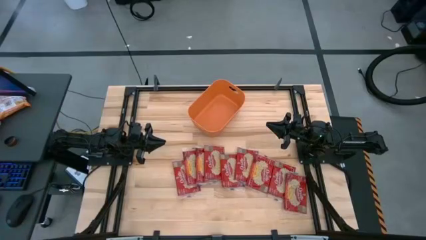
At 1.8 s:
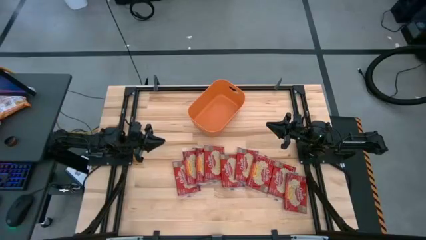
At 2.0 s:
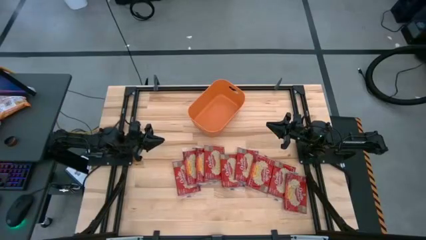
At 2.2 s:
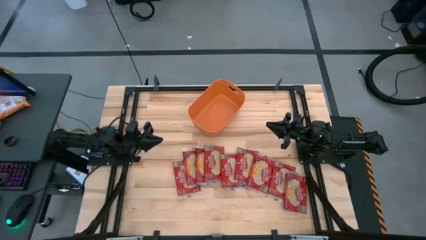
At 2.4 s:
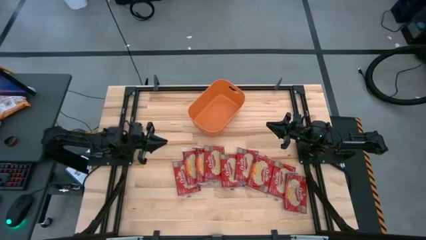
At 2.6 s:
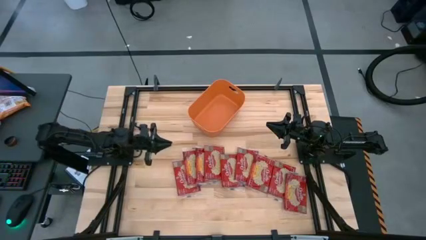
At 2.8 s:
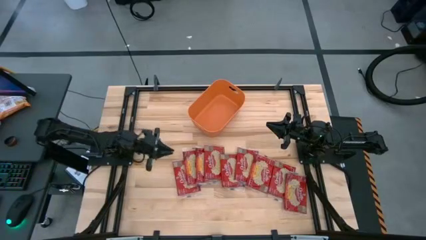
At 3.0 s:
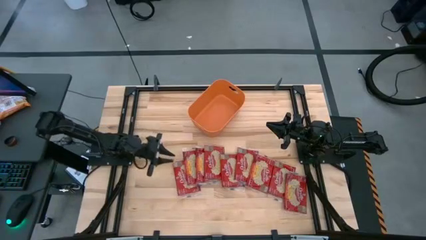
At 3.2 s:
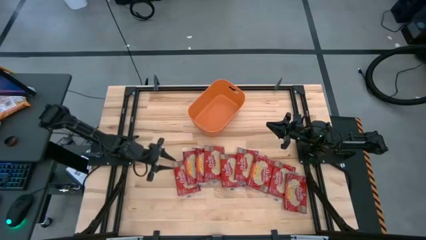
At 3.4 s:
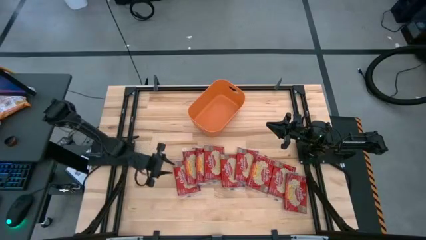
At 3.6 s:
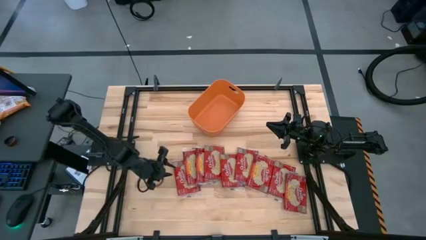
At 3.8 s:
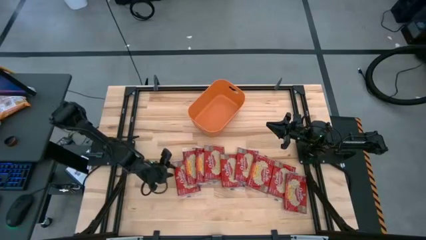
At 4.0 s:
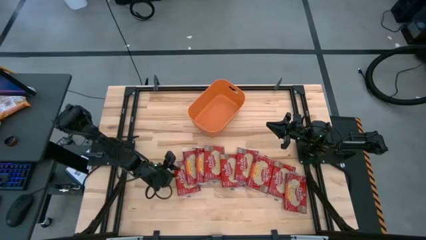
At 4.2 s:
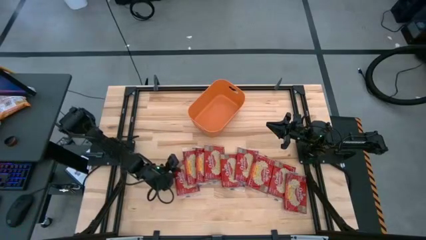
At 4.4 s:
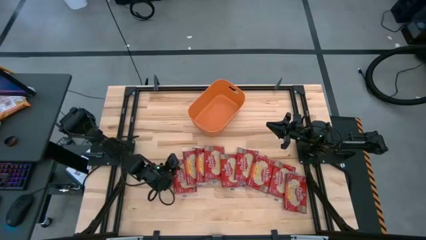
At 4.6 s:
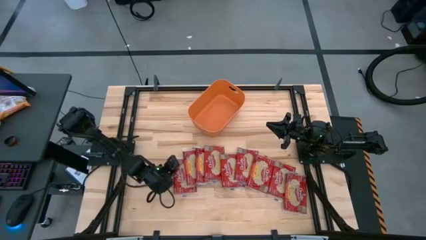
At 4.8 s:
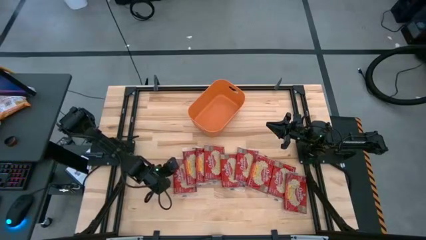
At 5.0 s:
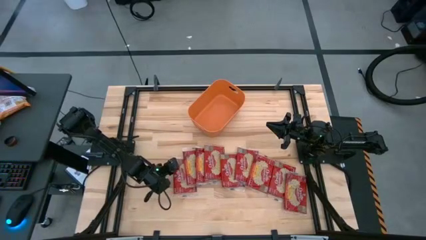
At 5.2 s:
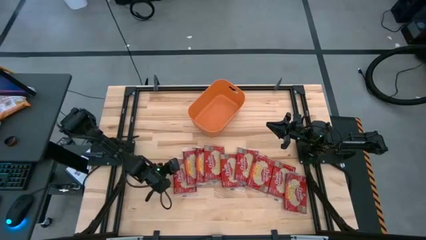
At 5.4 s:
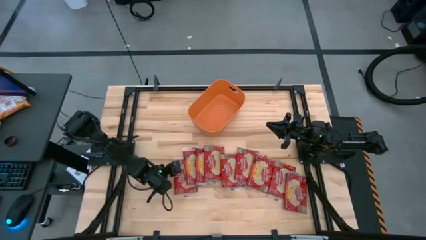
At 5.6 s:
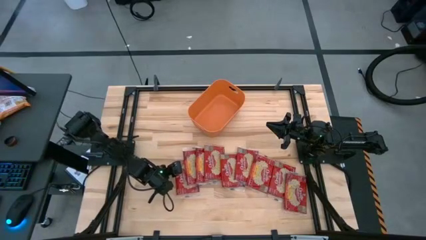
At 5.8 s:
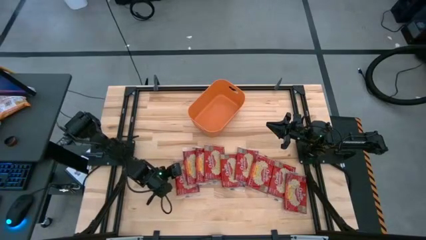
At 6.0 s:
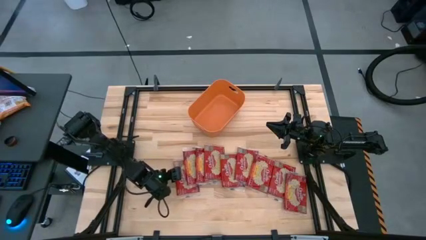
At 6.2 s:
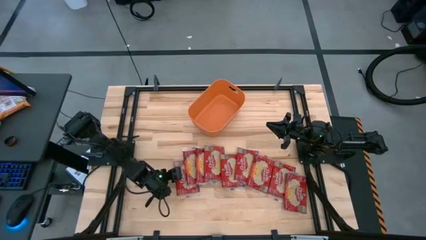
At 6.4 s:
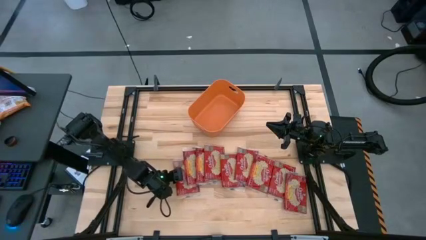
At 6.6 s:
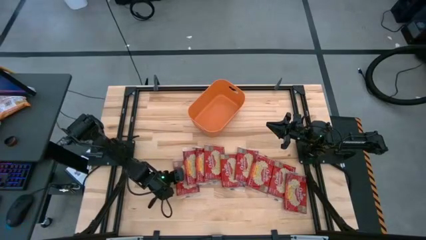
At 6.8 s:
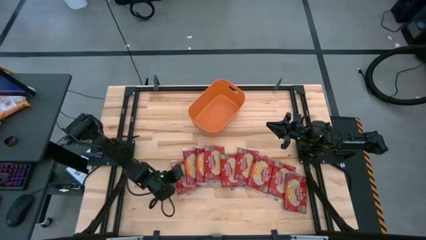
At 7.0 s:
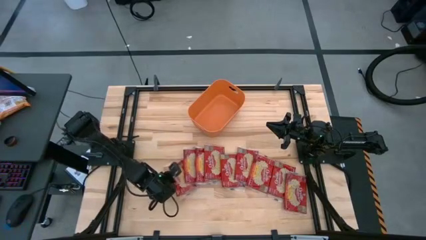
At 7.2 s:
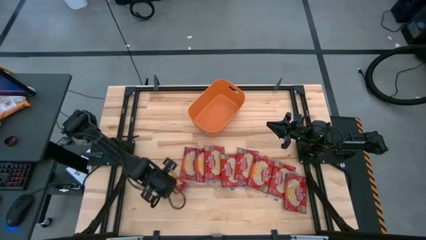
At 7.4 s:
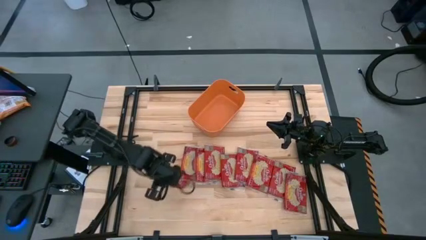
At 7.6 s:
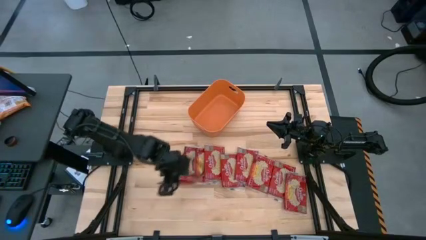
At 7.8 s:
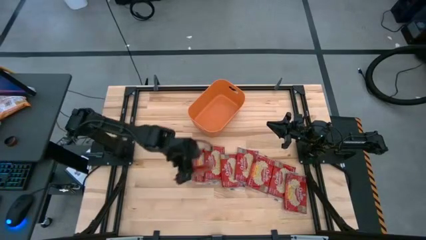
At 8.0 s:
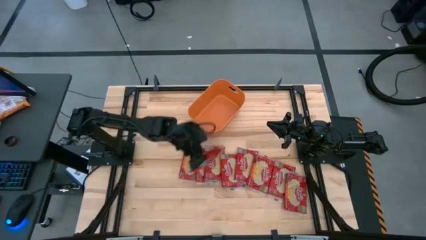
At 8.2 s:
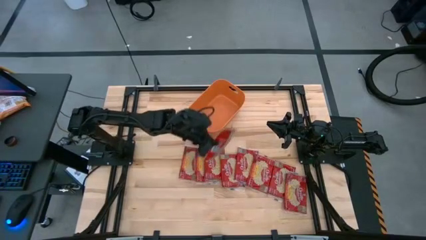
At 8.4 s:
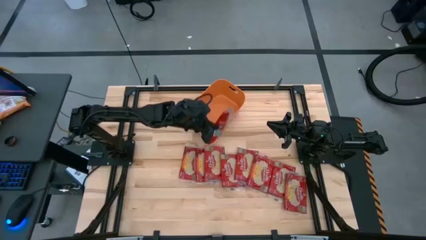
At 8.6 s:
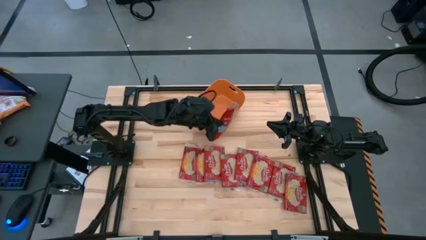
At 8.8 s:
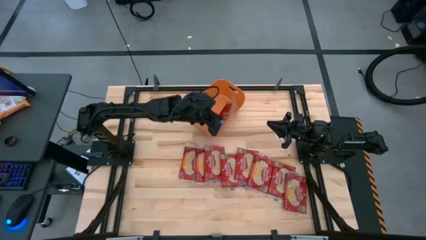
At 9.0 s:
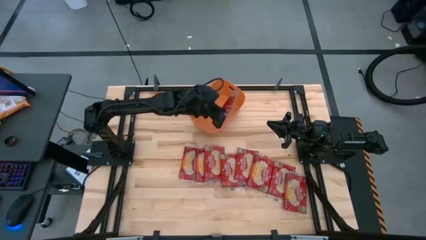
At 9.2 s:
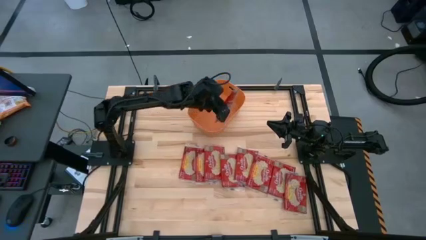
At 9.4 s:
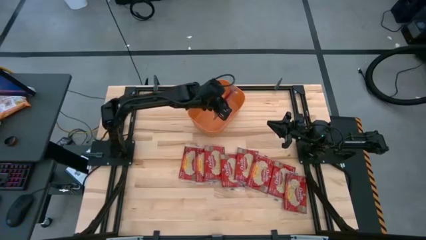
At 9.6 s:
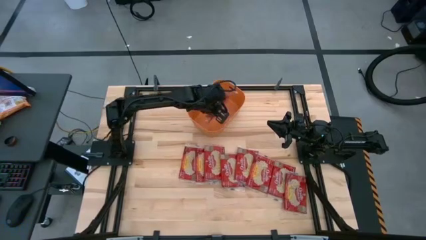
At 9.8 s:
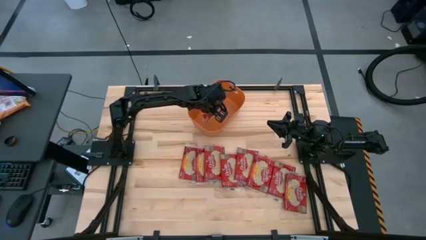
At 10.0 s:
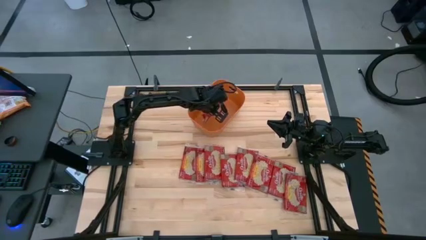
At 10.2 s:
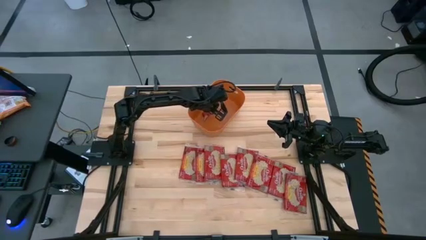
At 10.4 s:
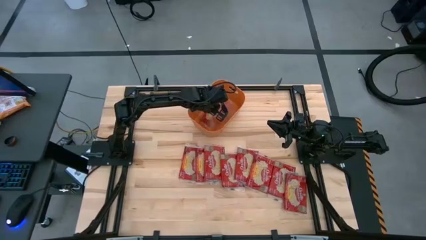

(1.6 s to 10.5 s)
Task: Sort popcorn bags into baskets
Put the red popcorn bag into the orange bin

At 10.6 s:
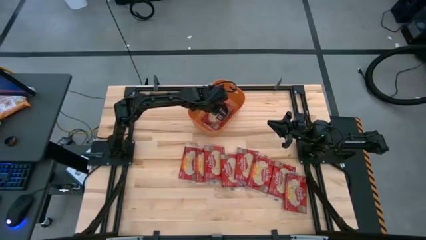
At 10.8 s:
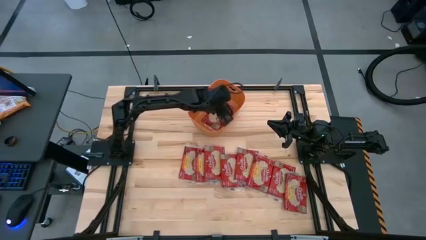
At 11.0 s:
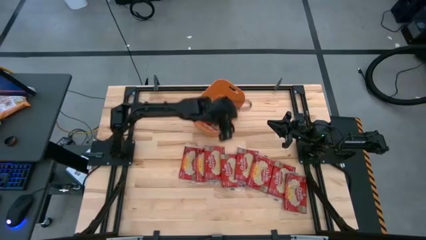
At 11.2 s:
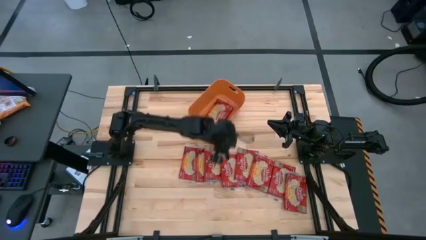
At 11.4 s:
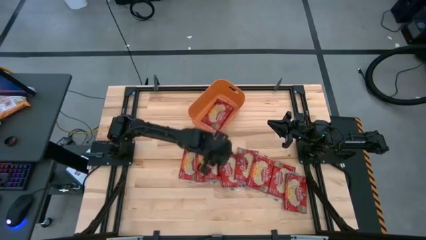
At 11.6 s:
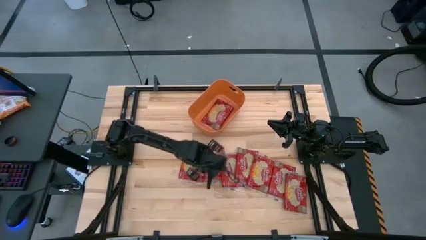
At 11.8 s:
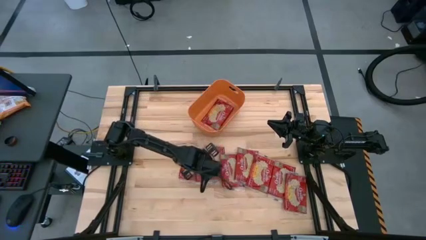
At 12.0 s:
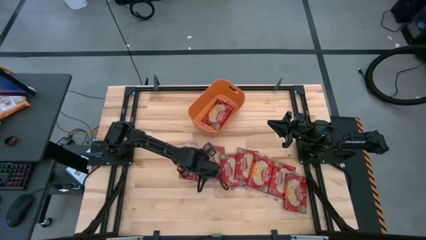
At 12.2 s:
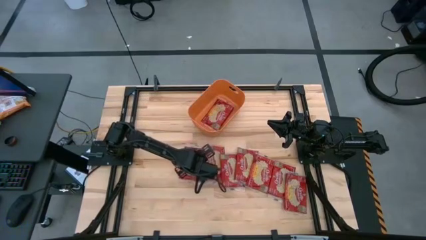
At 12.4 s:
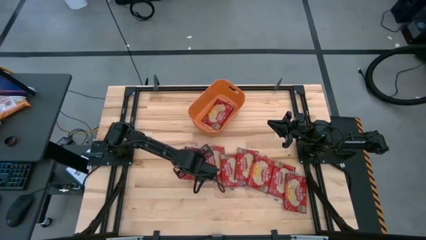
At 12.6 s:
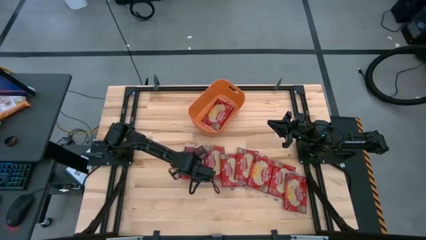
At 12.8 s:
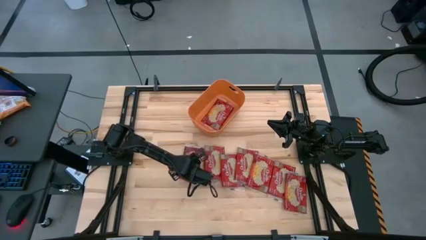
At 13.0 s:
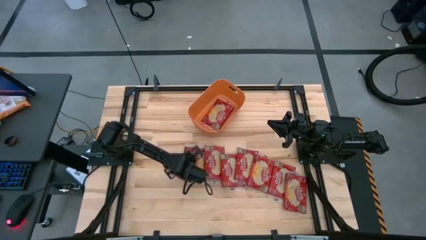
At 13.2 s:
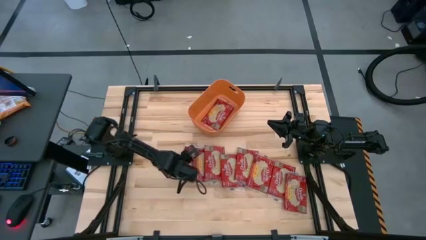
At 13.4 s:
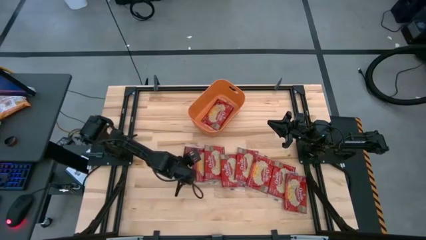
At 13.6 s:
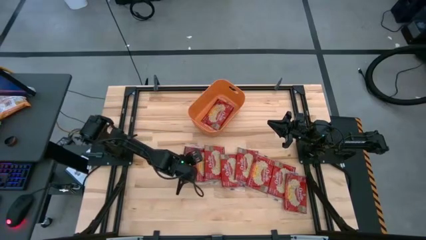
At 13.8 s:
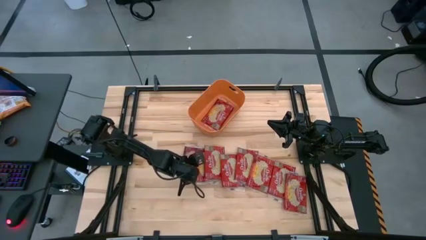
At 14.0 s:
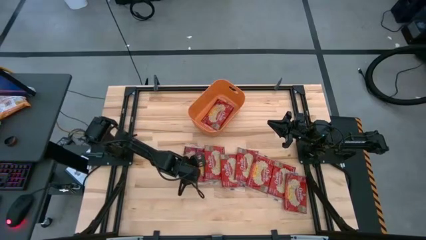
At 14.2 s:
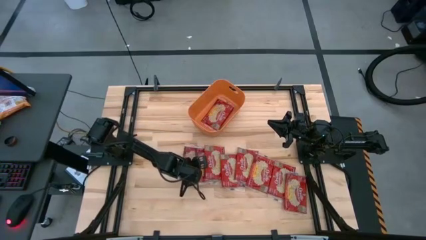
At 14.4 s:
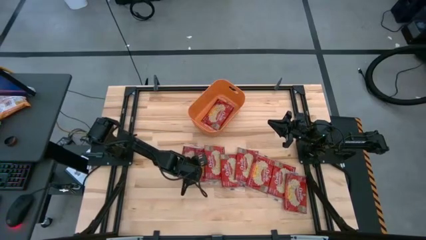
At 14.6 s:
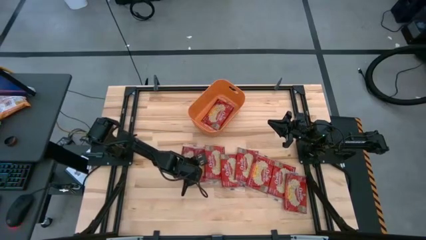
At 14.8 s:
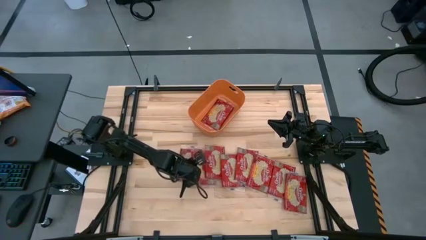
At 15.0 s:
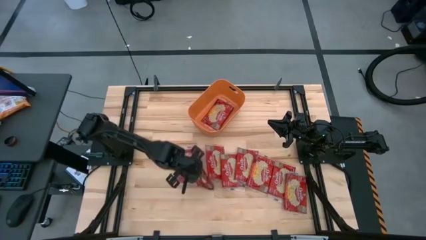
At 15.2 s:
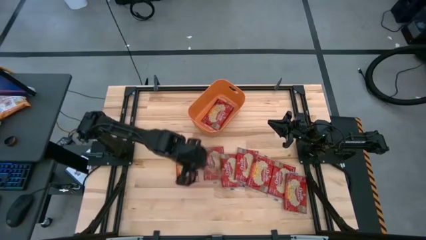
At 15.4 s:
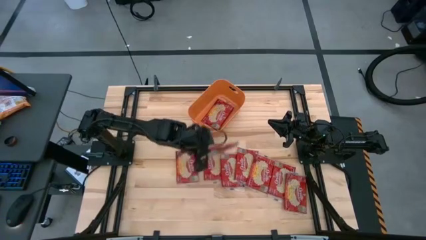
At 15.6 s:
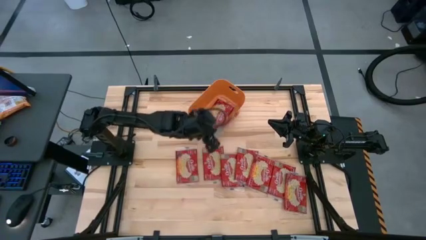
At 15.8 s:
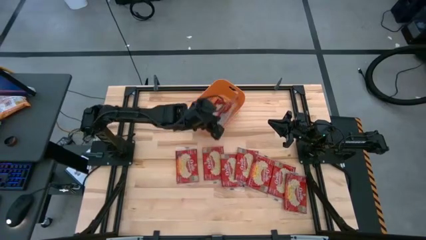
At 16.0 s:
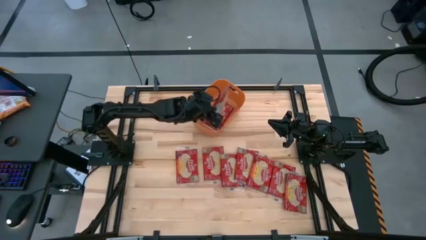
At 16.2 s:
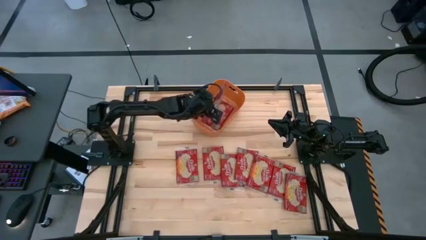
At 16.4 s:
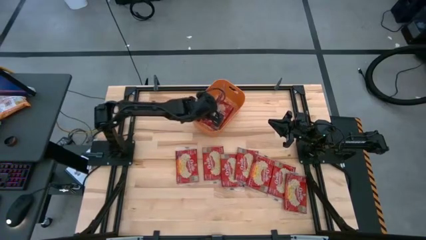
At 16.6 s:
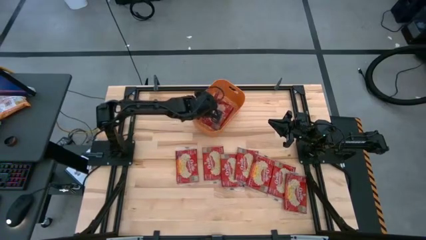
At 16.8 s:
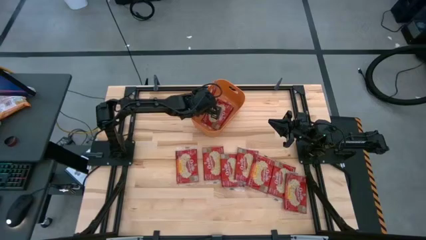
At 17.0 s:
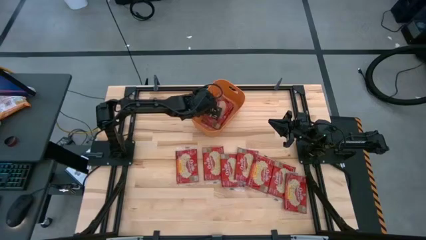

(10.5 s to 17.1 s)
Put the red popcorn bag into the orange bin

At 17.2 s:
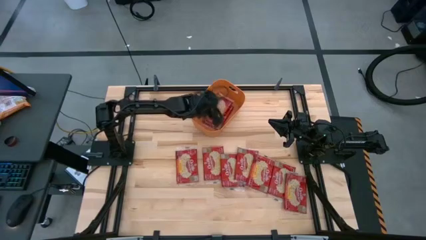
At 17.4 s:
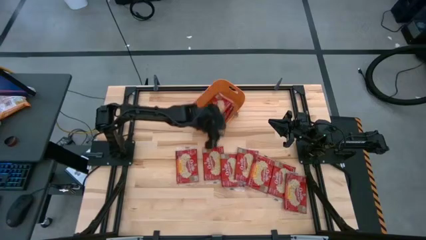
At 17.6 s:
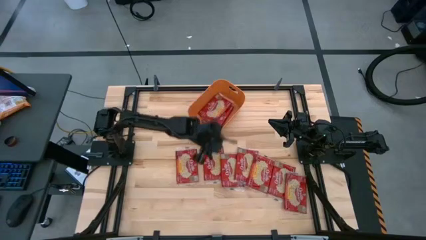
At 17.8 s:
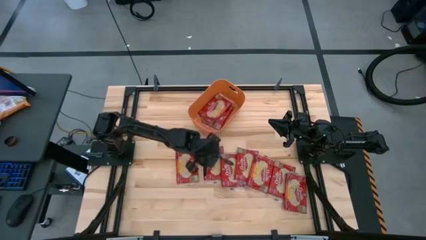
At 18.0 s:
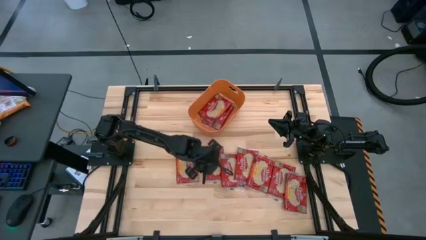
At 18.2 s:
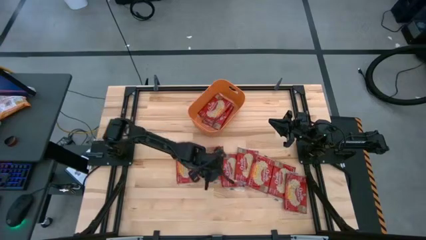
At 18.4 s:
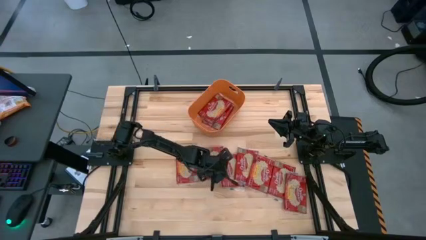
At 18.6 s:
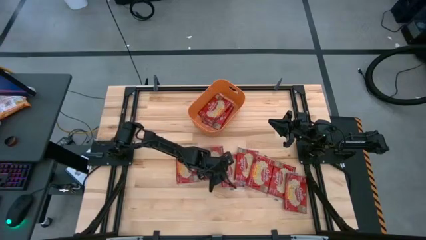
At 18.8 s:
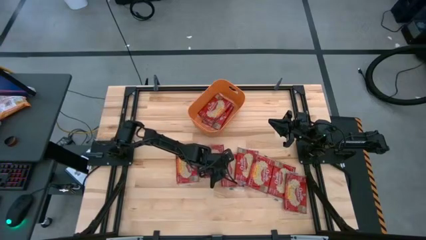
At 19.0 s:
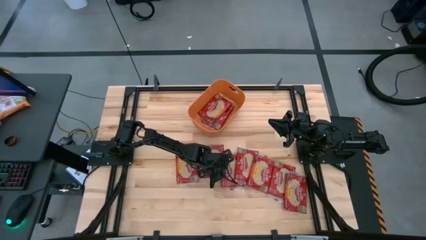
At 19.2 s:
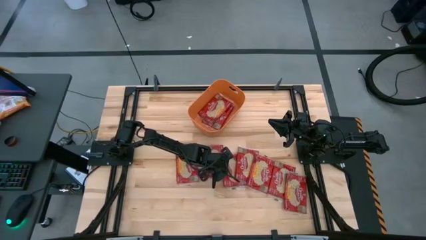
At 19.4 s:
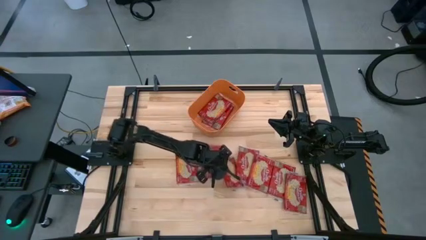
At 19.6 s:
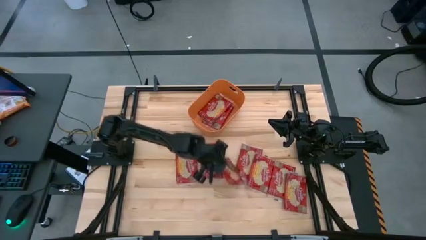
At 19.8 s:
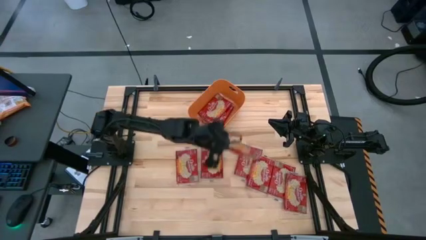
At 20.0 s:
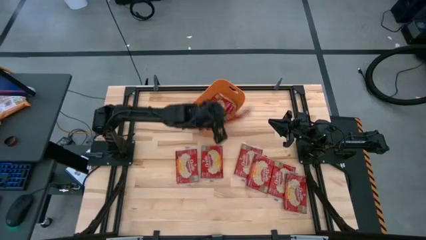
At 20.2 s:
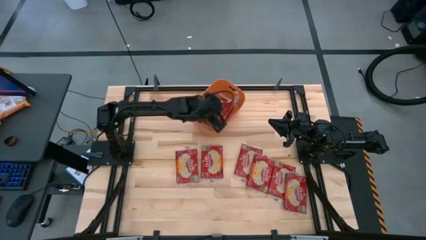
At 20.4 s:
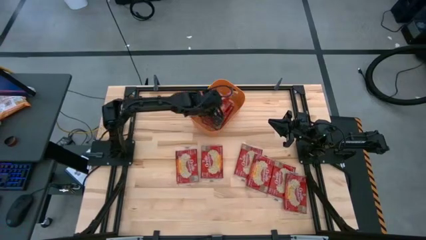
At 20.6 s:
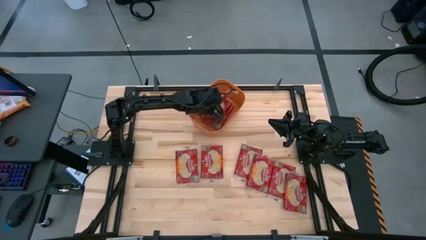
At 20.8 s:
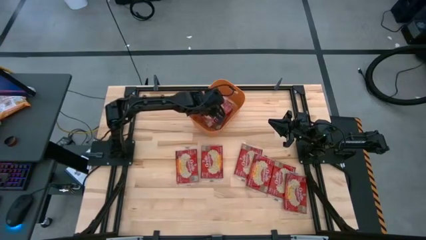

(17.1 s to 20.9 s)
Put the red popcorn bag into the orange bin
